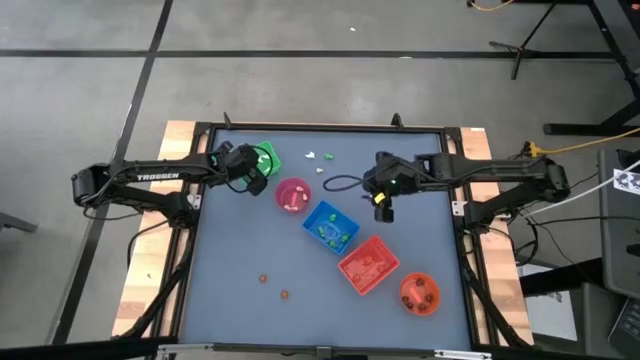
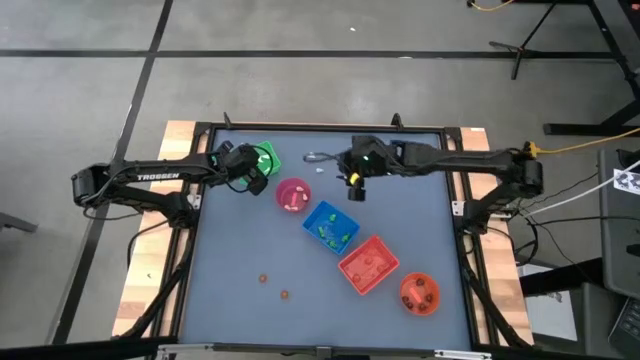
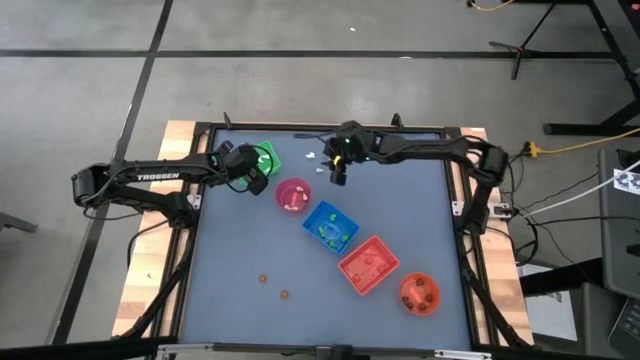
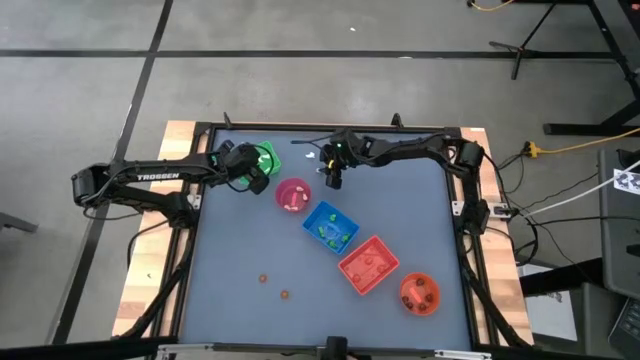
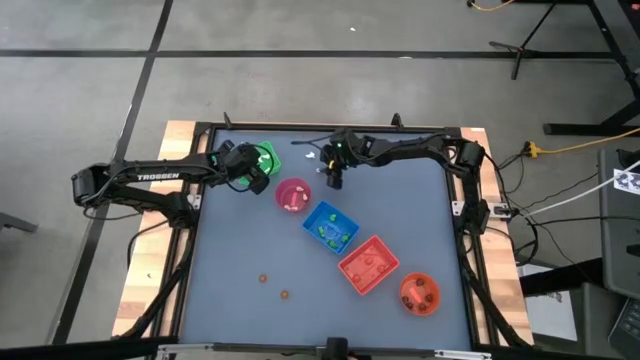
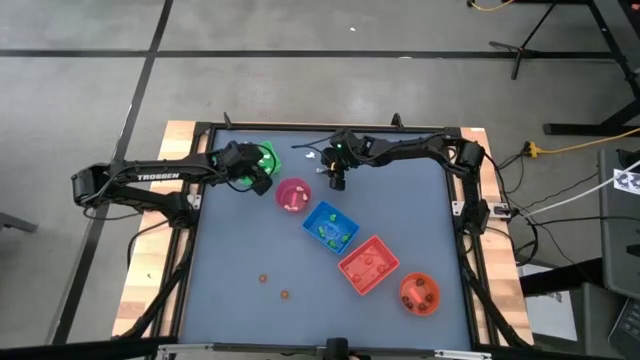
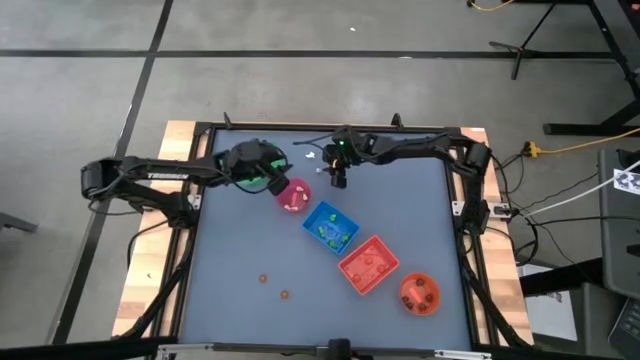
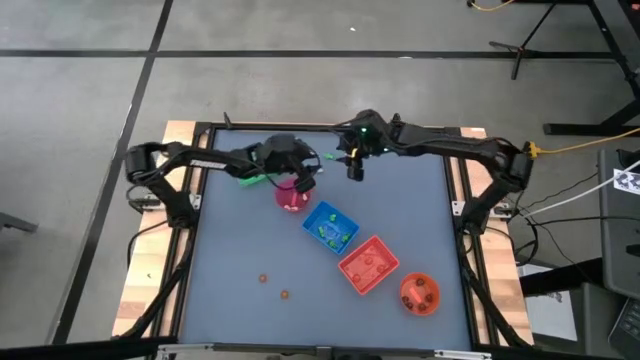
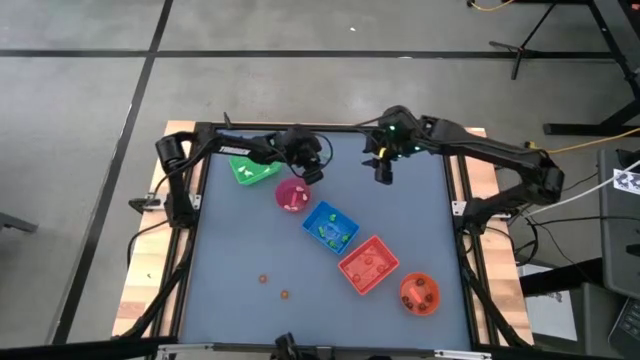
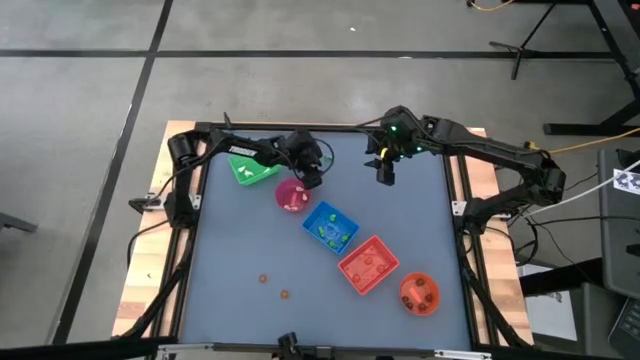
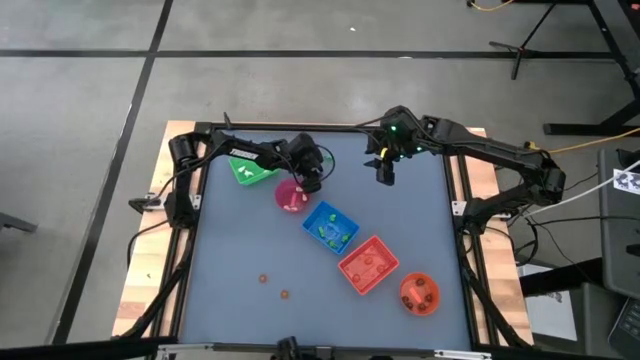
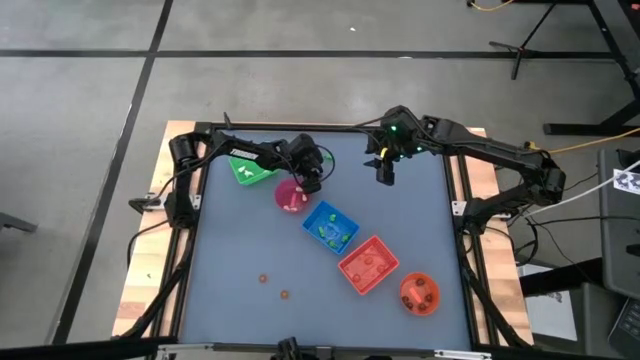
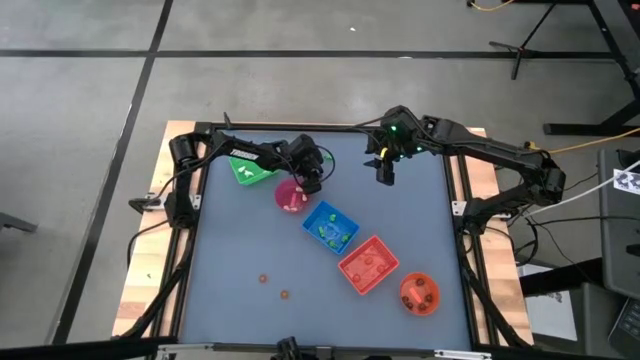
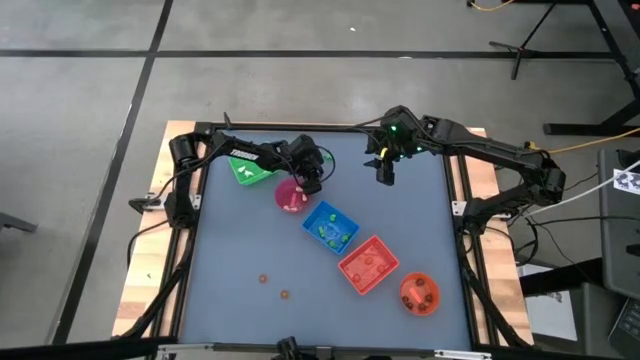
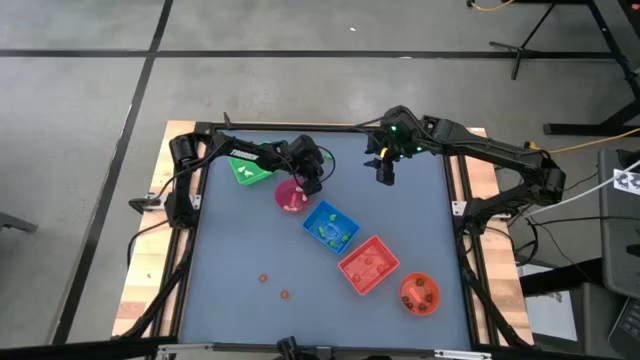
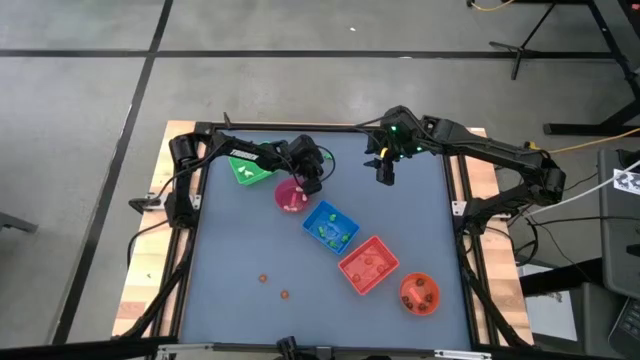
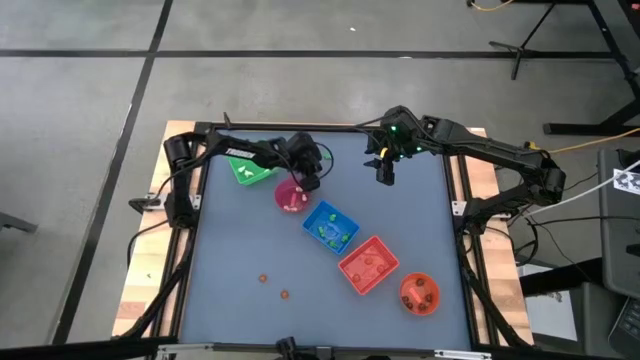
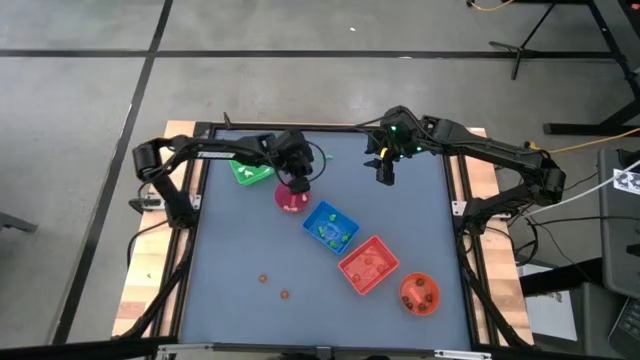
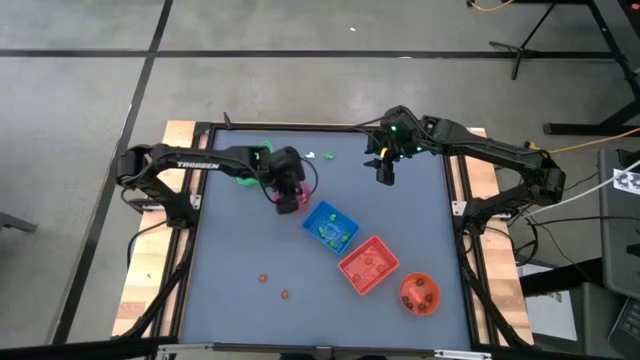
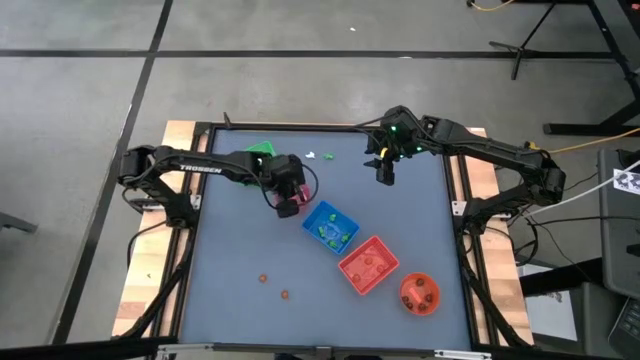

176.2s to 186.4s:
Task: Sort Halloween decoration
Put the light brown skull toy into the light red bin

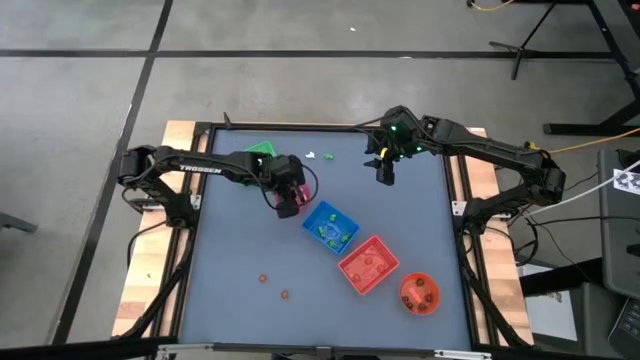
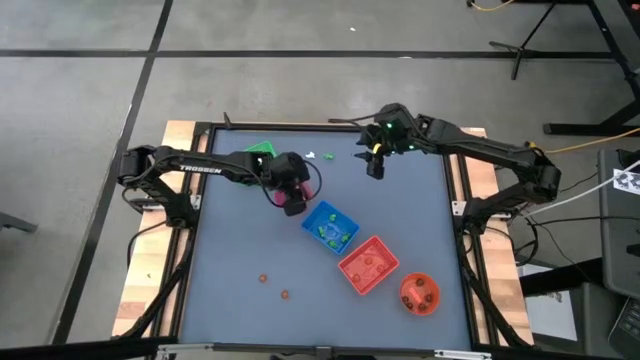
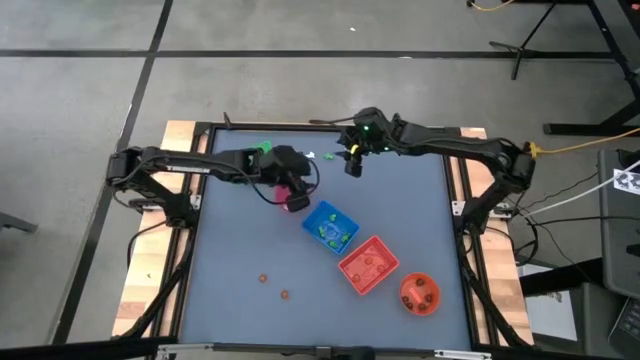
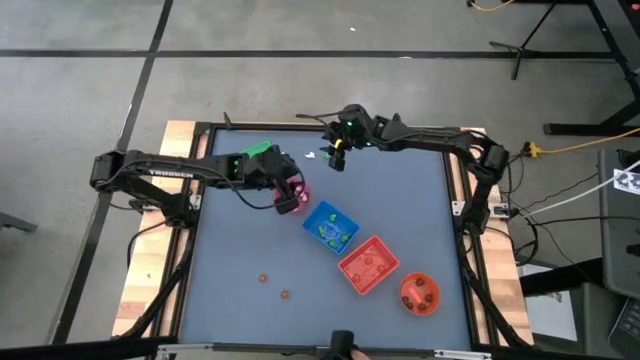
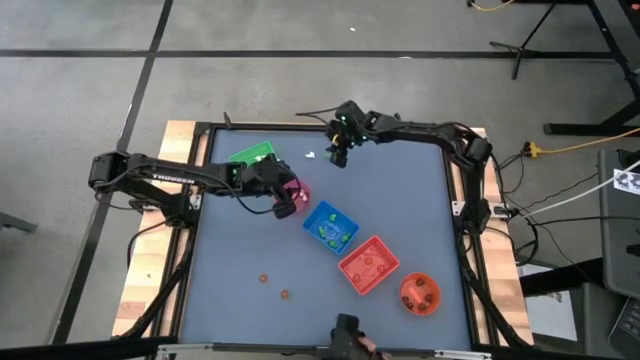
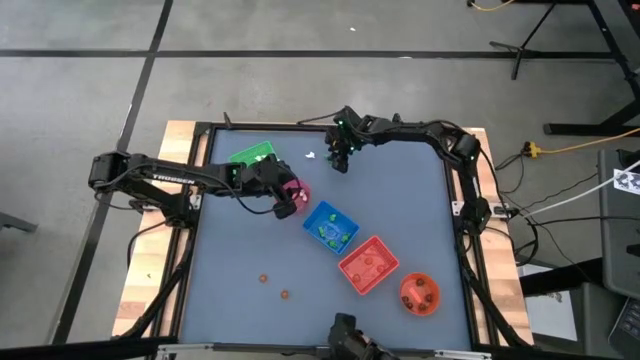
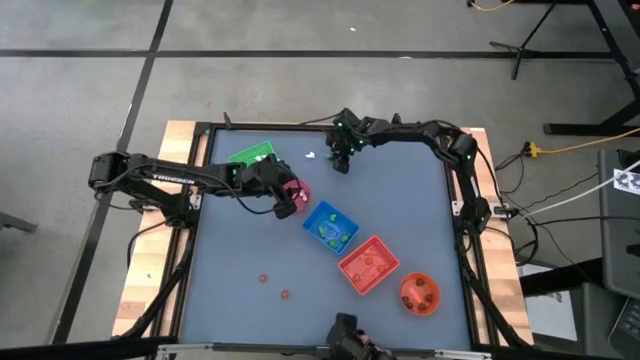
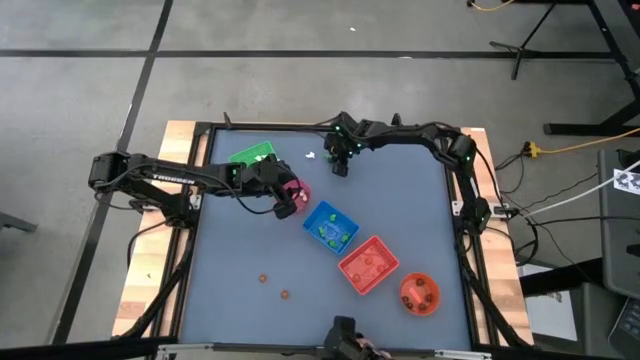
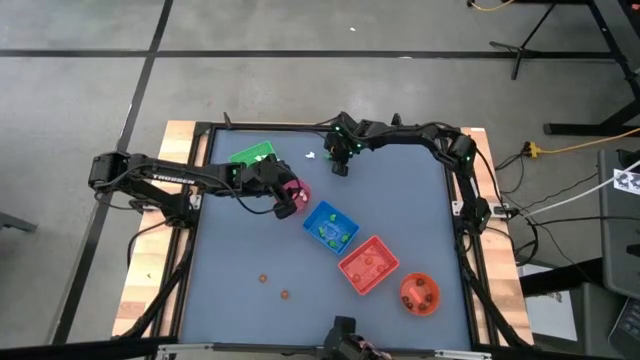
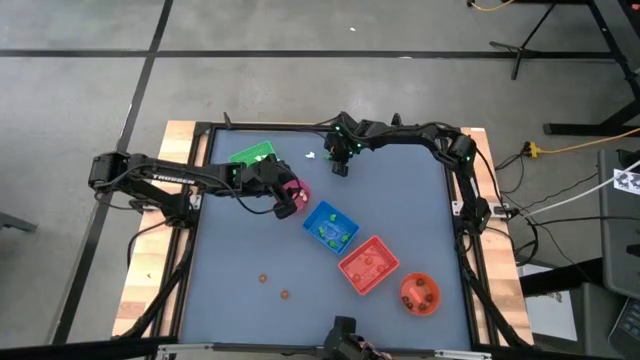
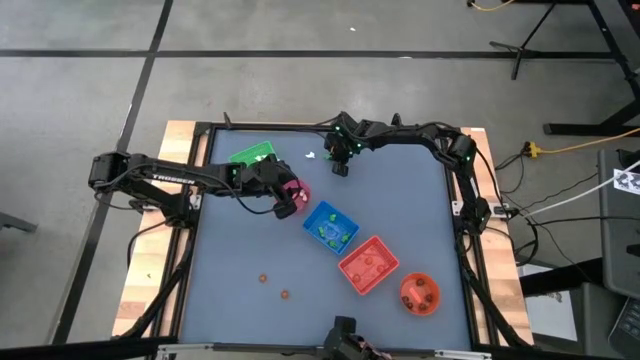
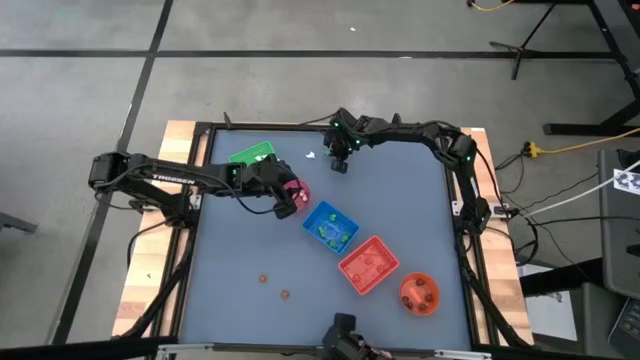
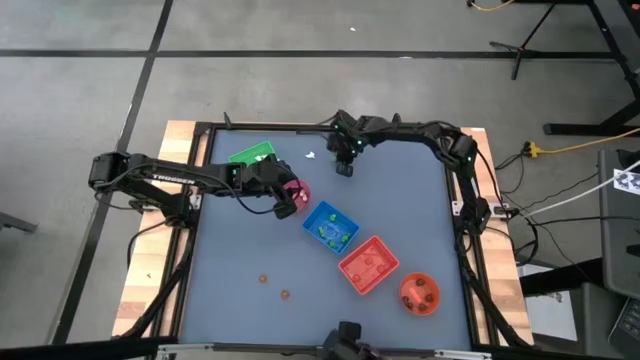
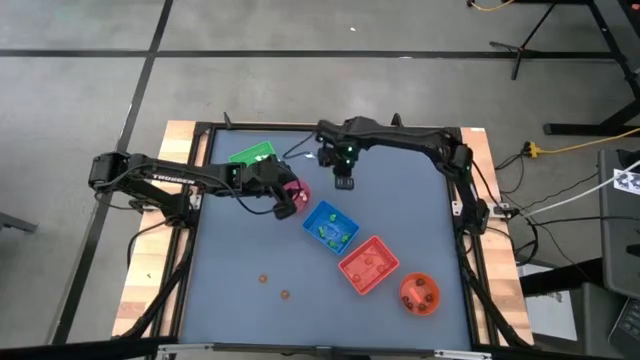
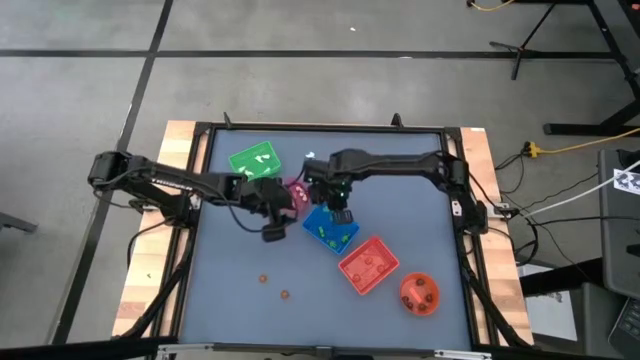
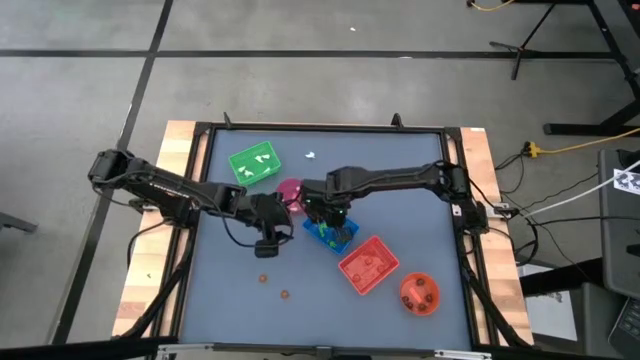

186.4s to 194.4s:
Put the green skeleton toy into the blue bin

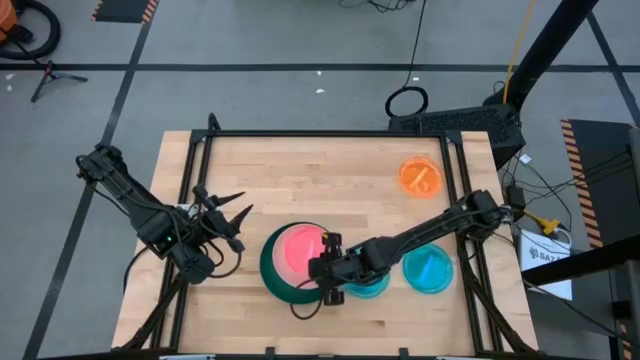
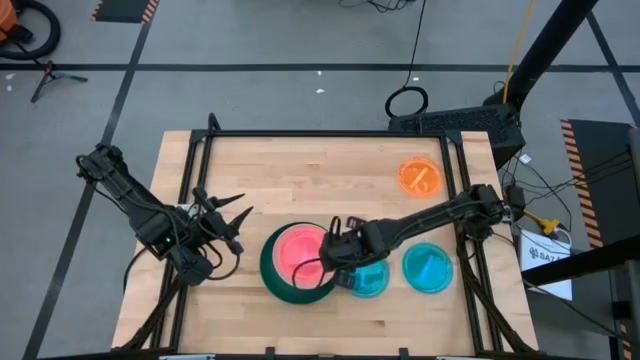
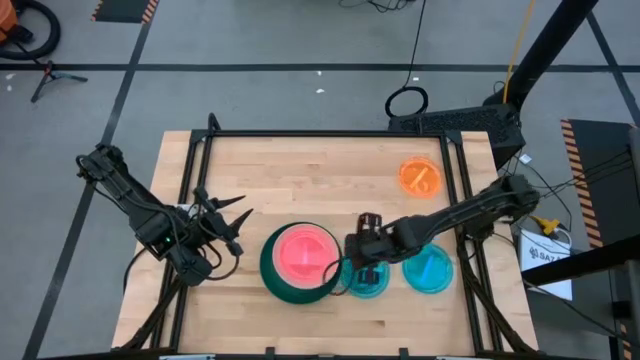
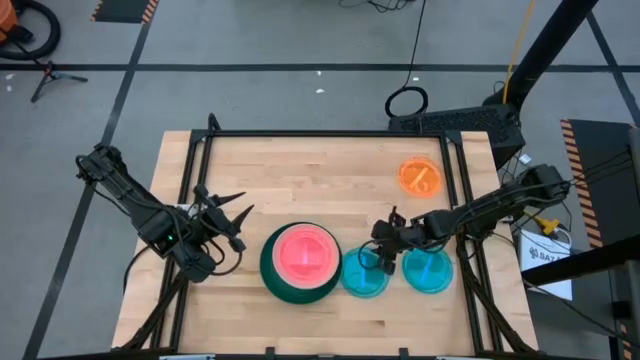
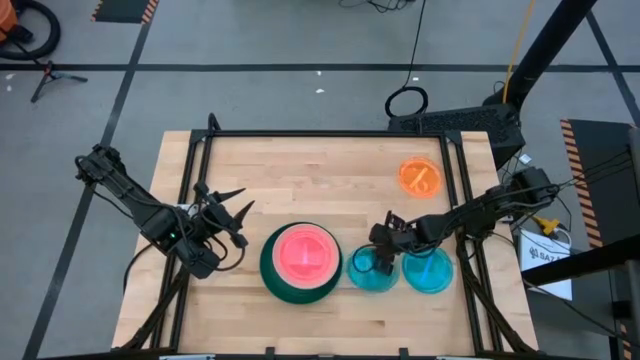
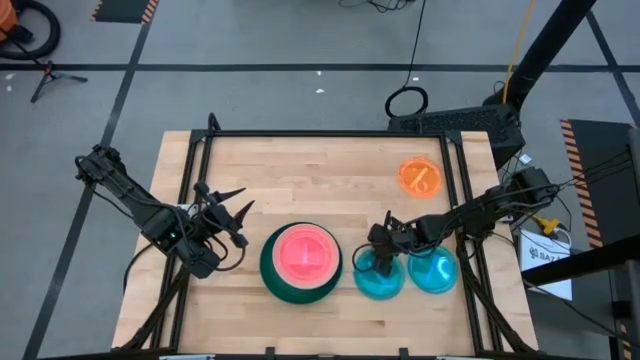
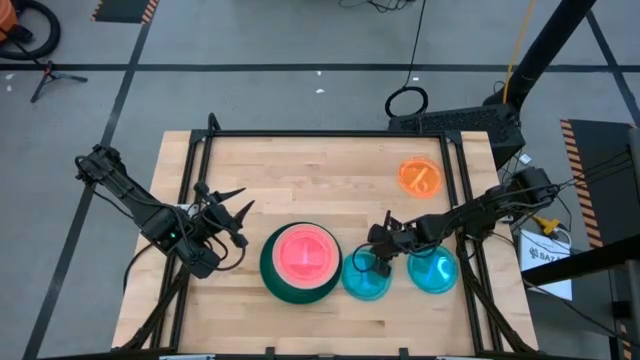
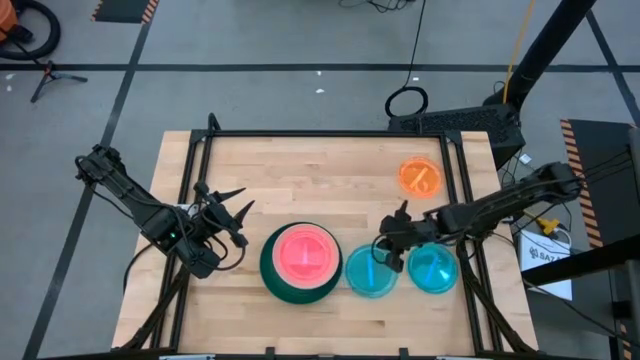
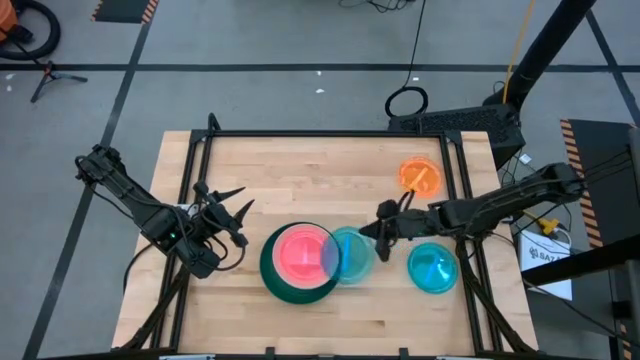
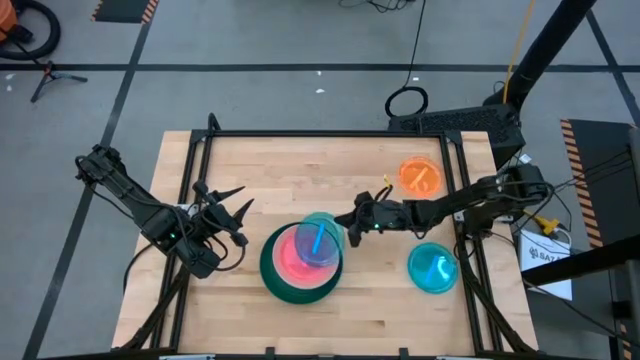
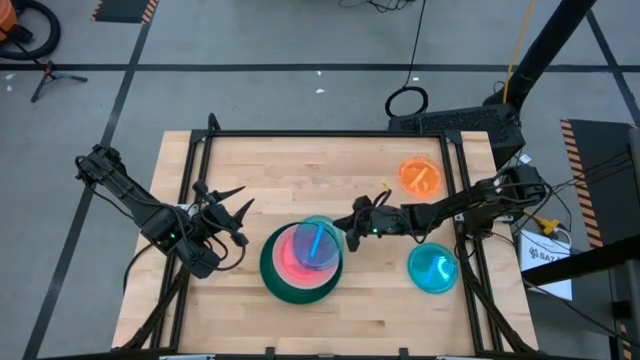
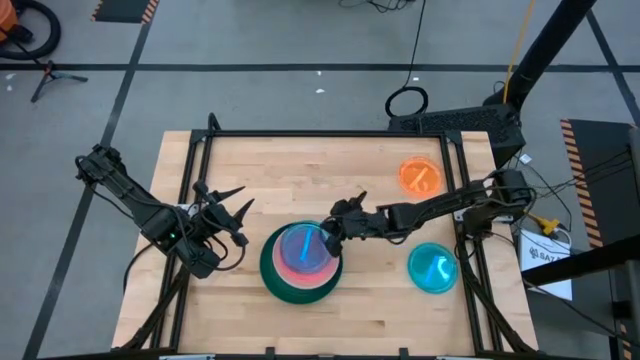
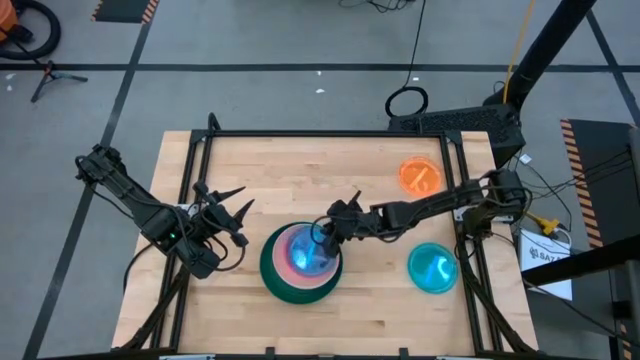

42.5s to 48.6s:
Task: Stack plastic plates
Stack the left blue plate on top of the pink plate
